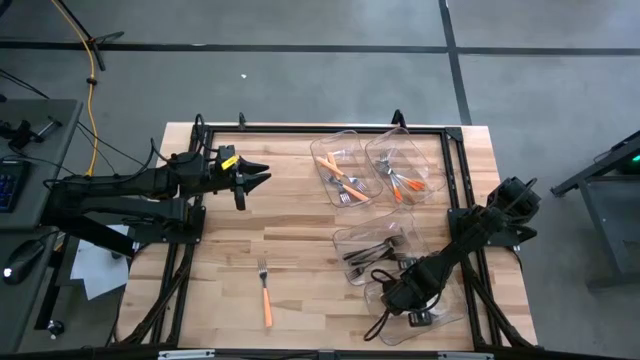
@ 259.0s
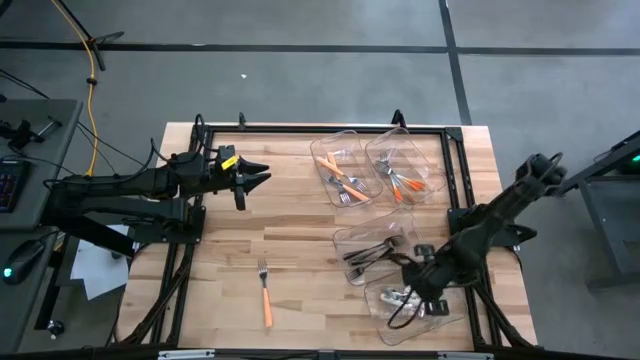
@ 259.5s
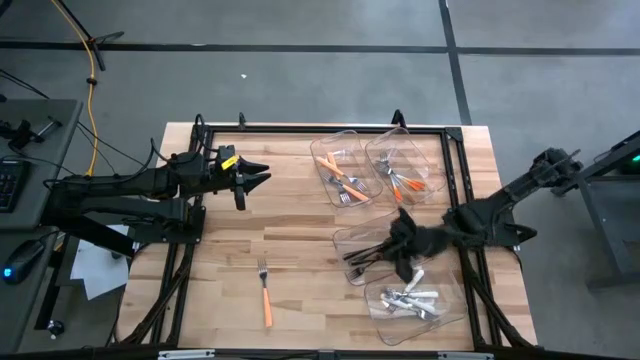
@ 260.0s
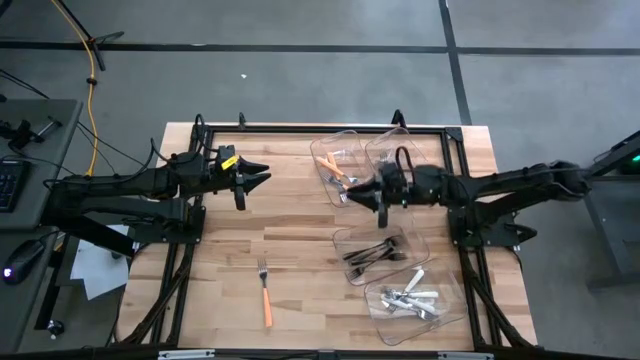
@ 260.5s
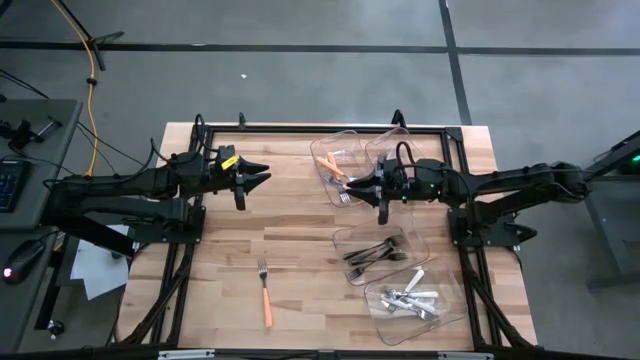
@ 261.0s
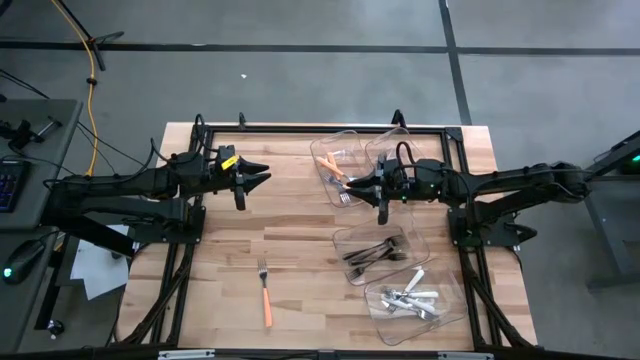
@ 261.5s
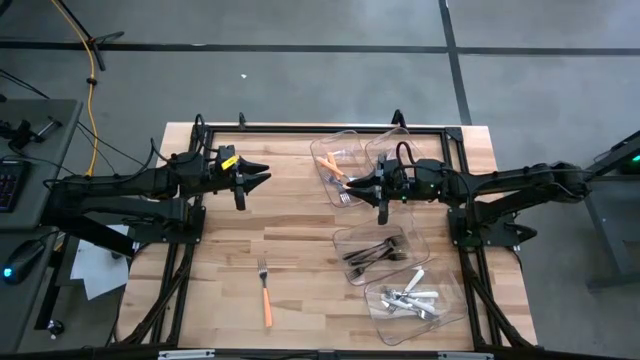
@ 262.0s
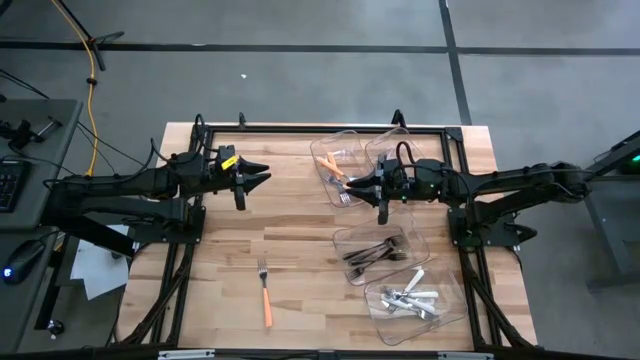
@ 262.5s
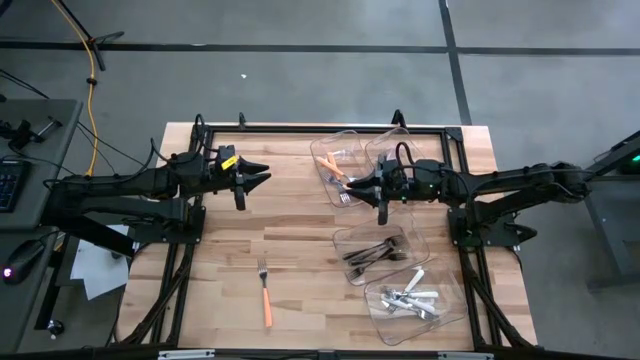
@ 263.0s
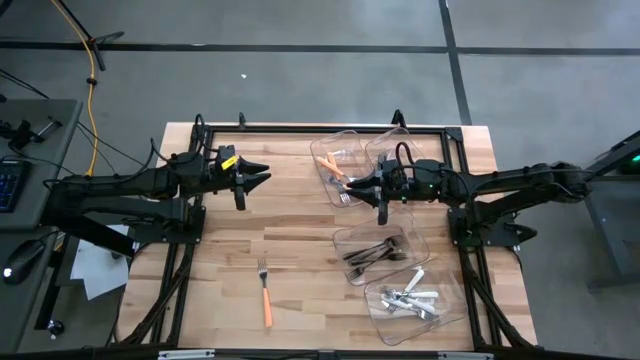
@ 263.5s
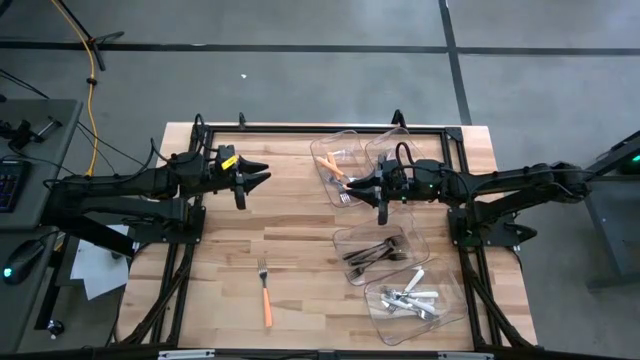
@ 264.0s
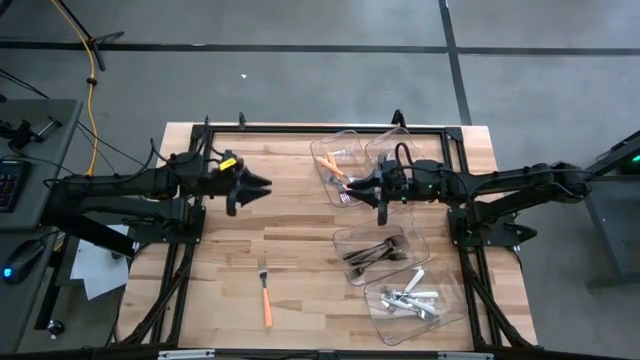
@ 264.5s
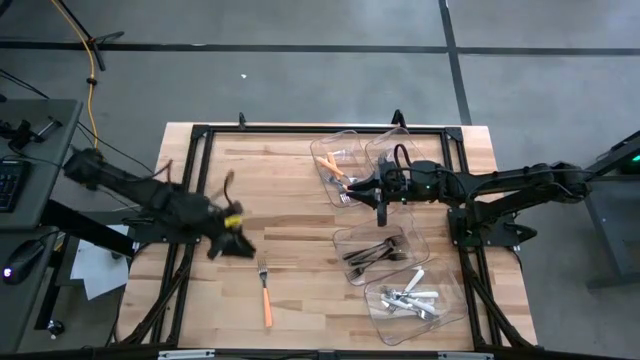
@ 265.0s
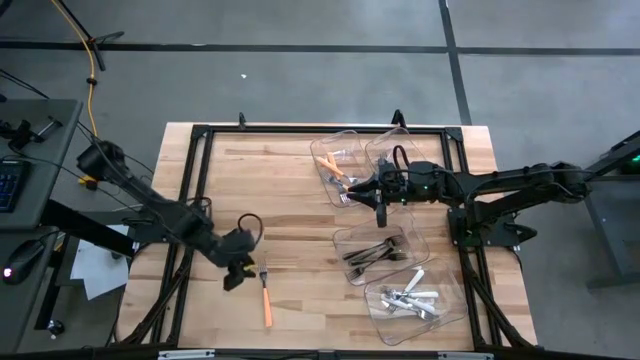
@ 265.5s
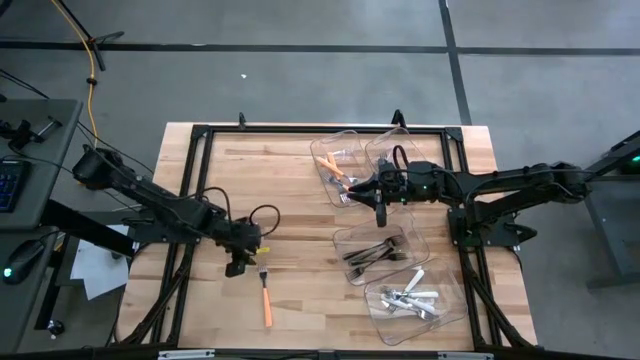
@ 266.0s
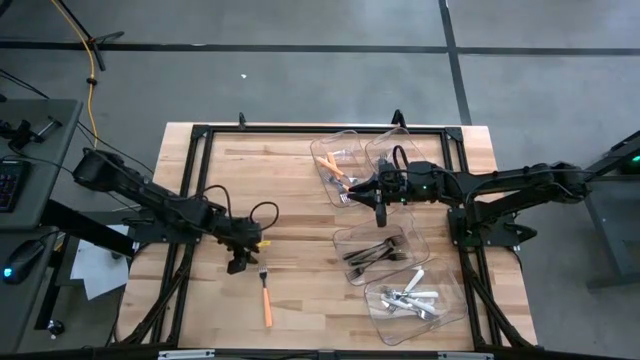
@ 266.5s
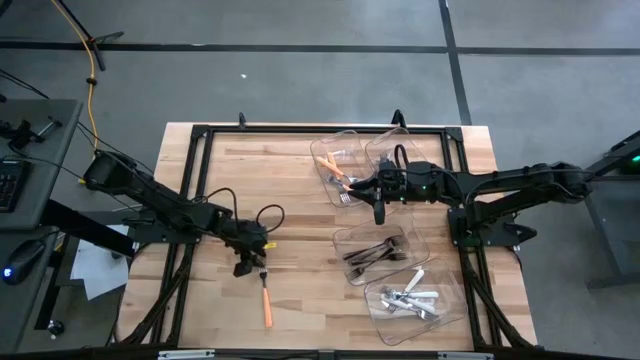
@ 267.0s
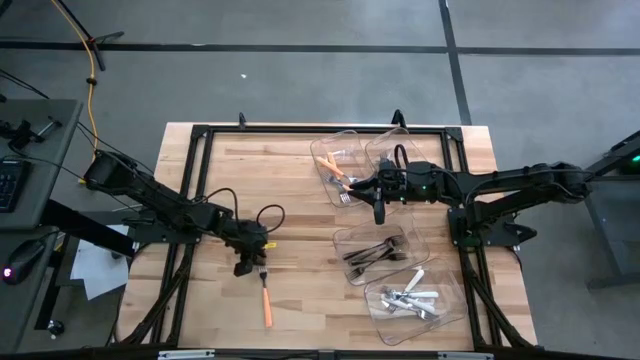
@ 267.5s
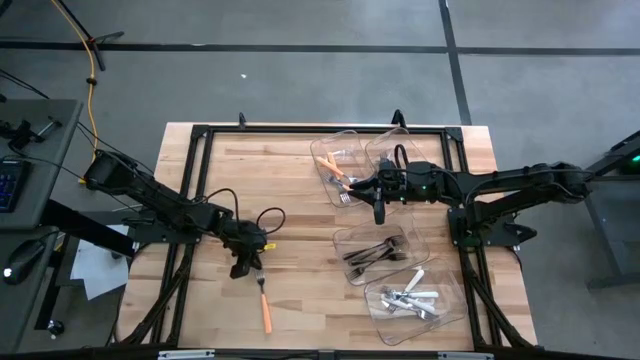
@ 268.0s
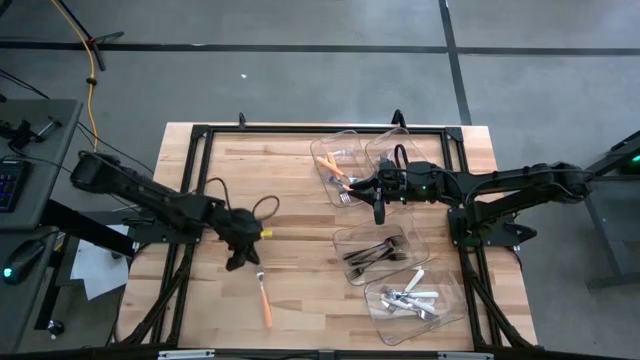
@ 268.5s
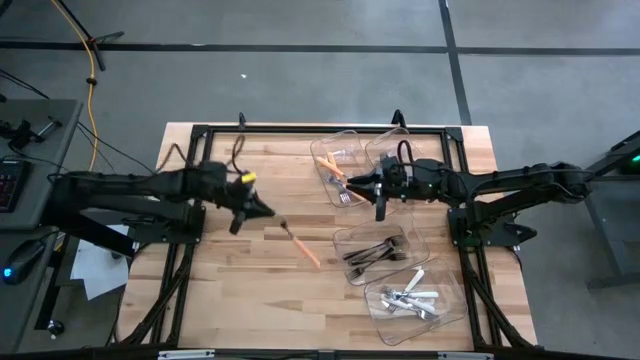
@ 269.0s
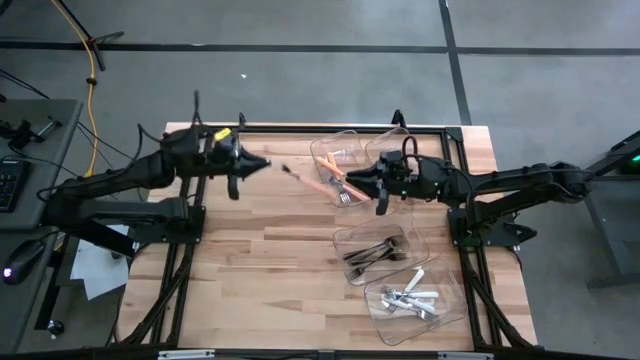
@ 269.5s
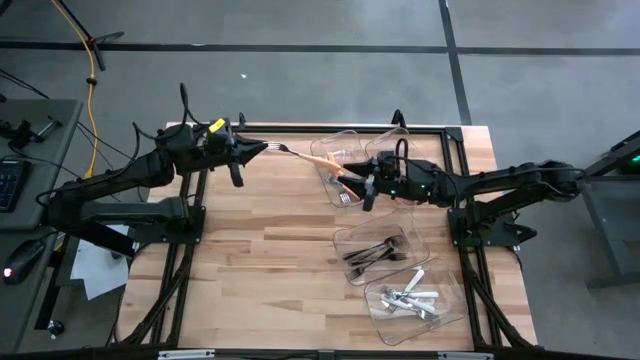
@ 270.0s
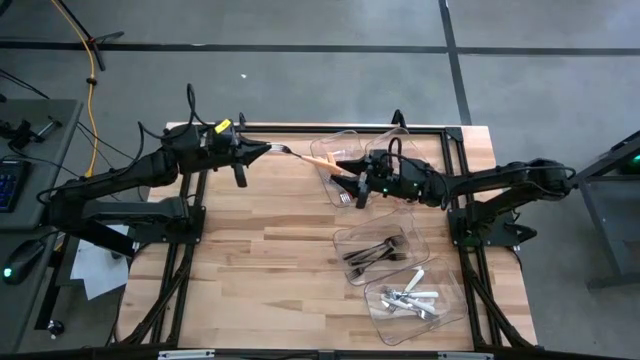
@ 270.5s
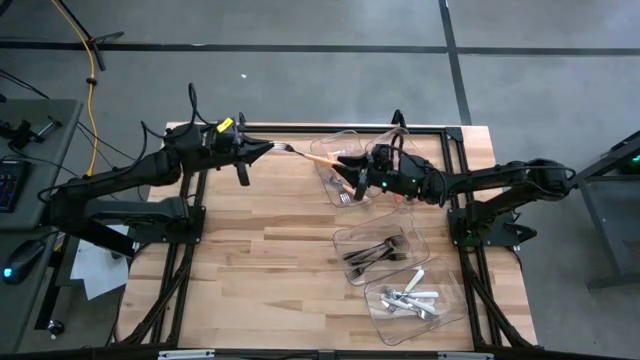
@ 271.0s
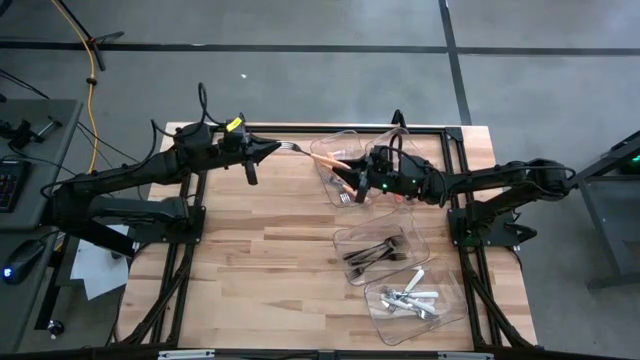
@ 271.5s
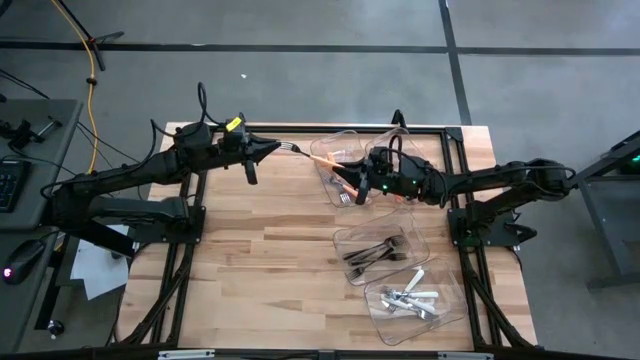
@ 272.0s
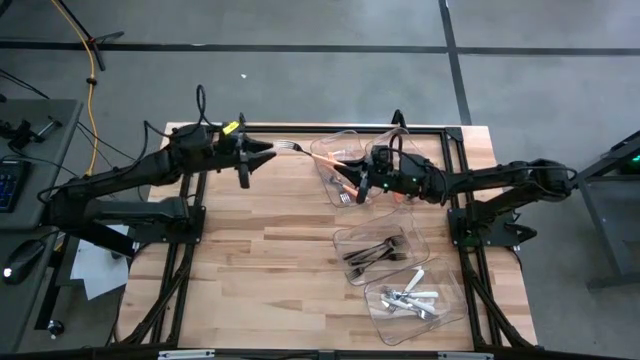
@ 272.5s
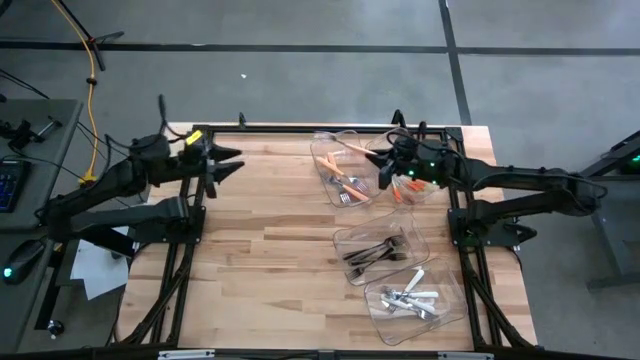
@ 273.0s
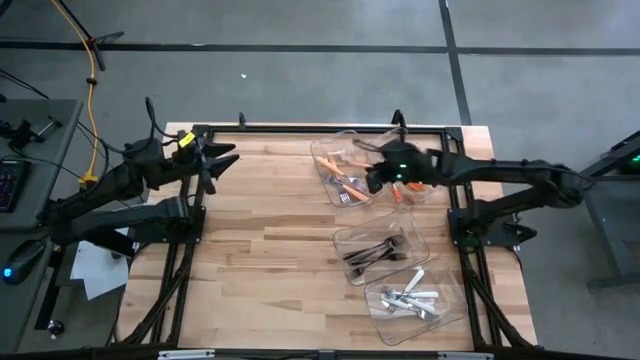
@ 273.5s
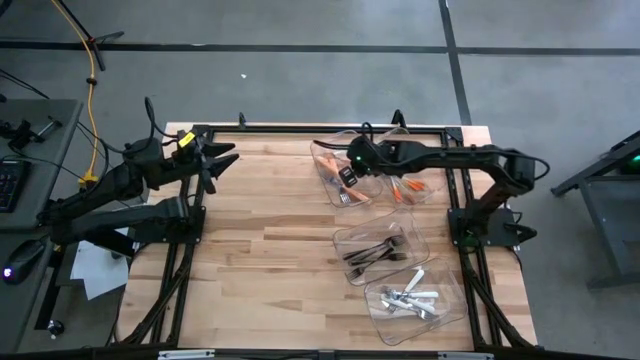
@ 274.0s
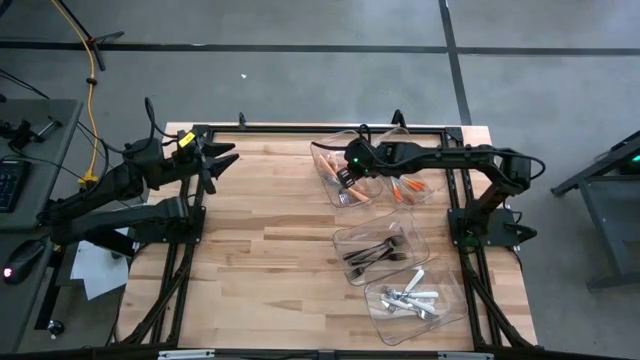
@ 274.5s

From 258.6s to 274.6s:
Task: Sort silverware by color (type)
Put the light orange fork into the left transparent bin

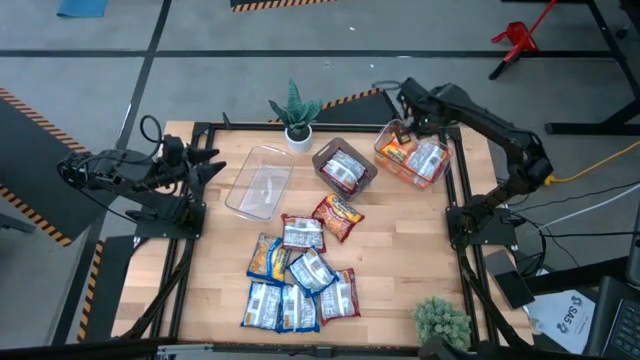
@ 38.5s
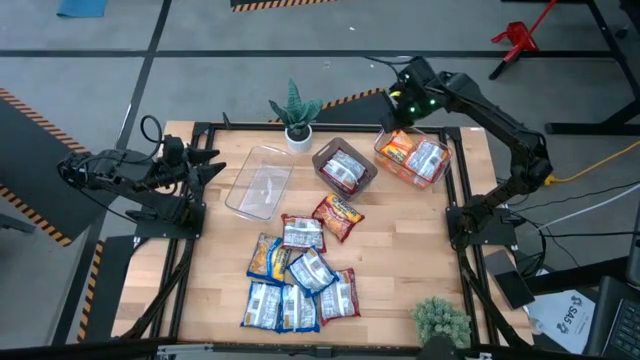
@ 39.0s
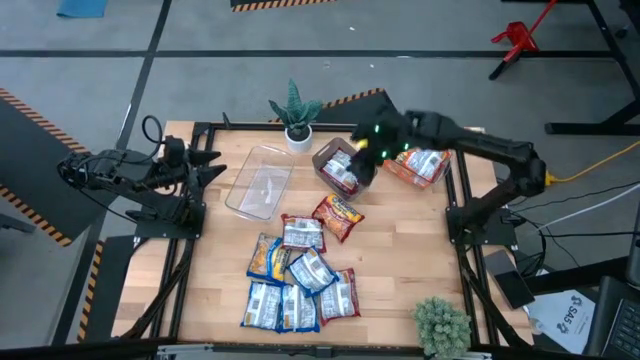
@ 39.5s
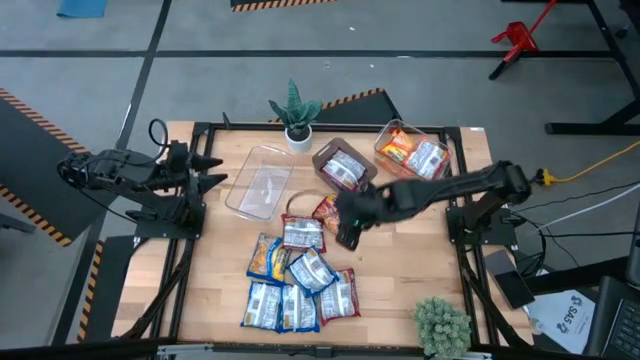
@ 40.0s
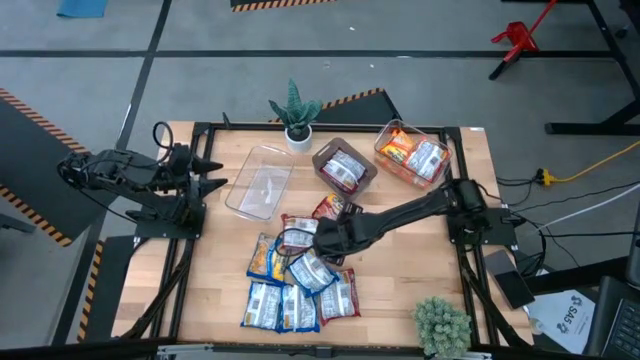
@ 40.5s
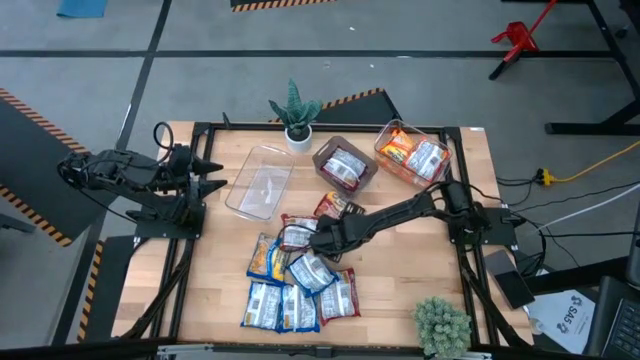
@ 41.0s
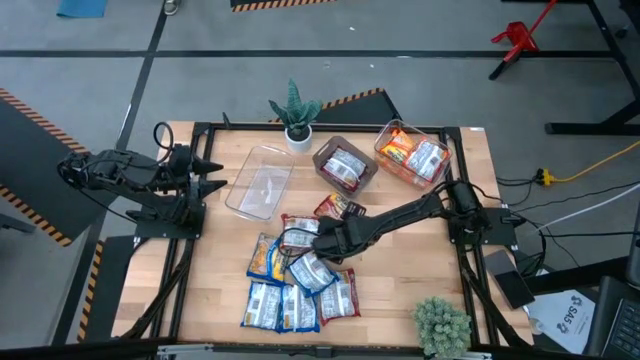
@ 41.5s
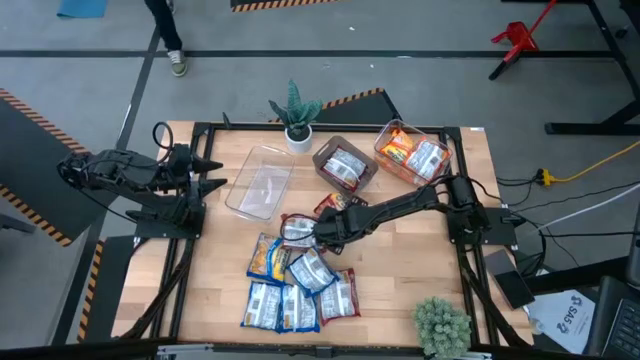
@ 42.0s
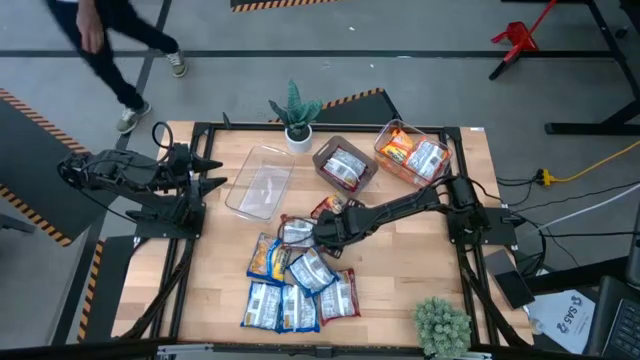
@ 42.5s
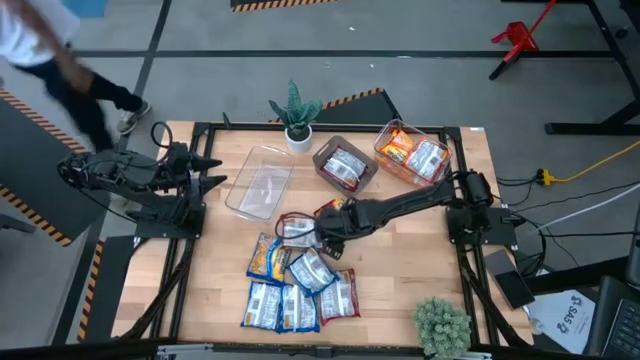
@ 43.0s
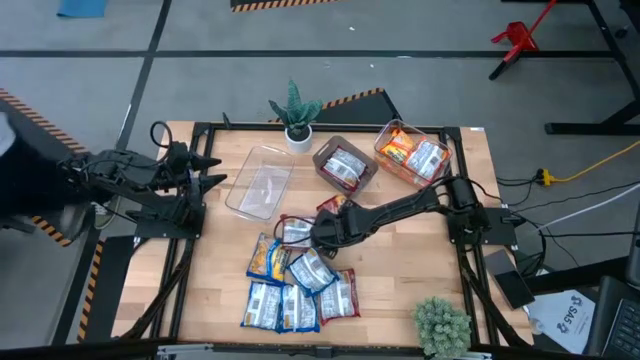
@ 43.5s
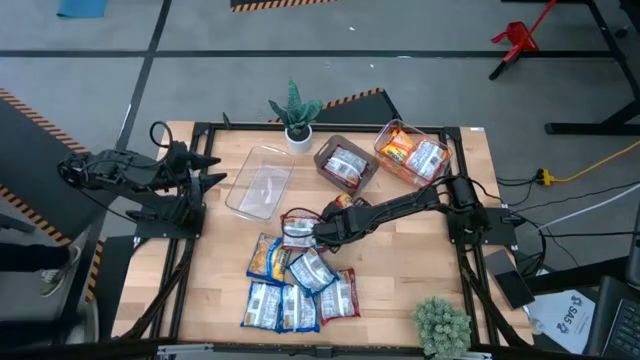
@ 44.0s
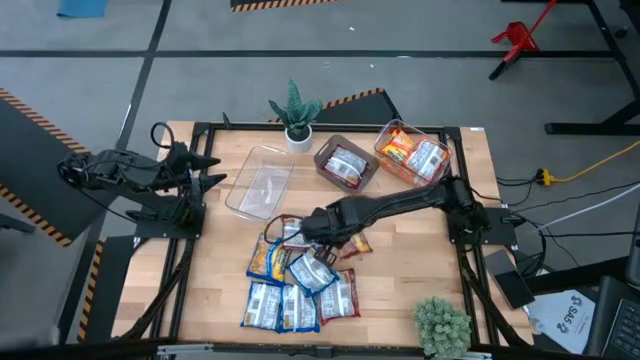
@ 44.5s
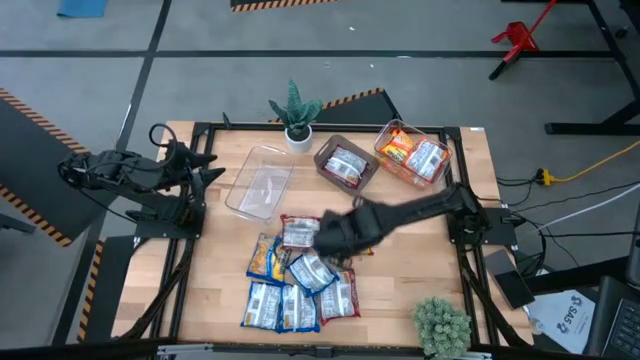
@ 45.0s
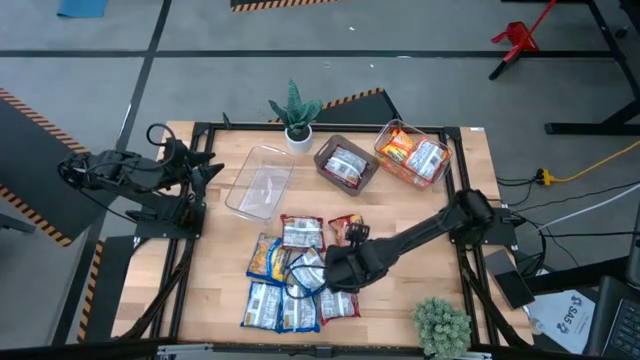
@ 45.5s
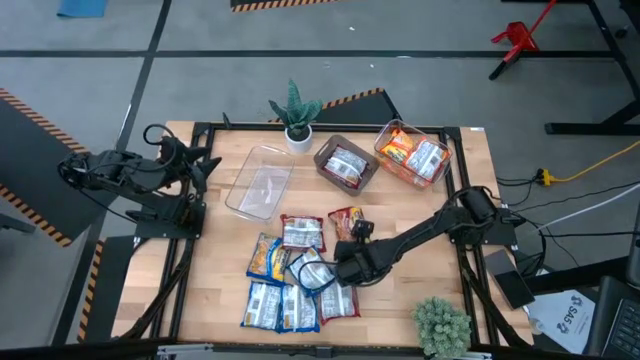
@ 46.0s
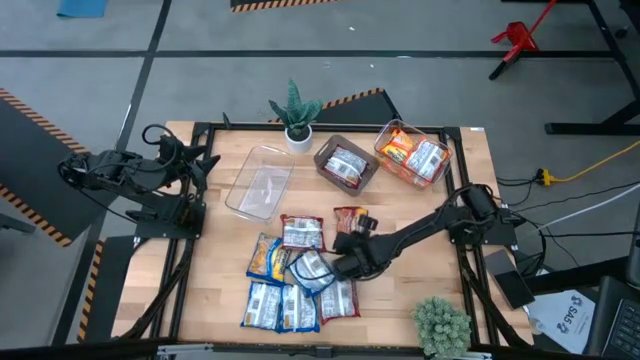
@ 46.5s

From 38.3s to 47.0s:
Task: Sort Maruchan noodles
Put the red noodle pack into the black bin
